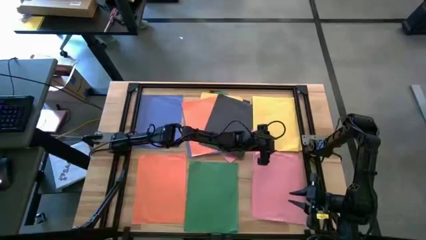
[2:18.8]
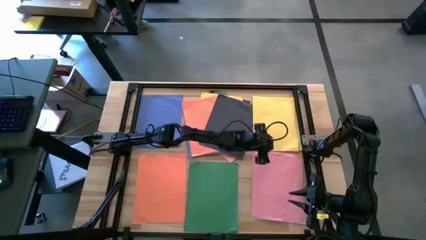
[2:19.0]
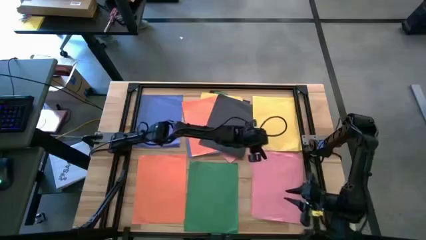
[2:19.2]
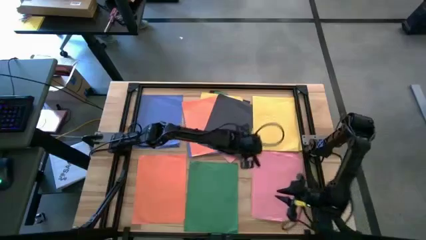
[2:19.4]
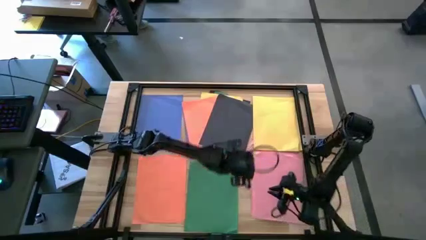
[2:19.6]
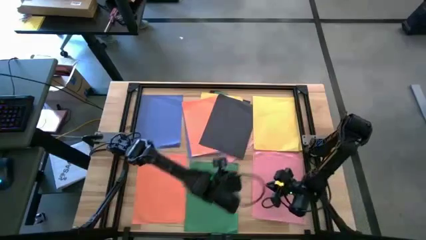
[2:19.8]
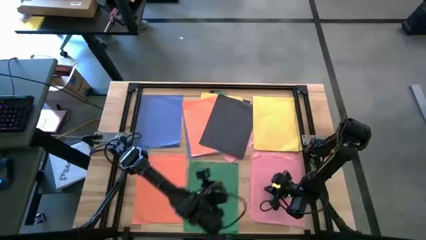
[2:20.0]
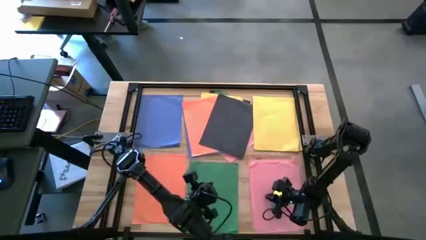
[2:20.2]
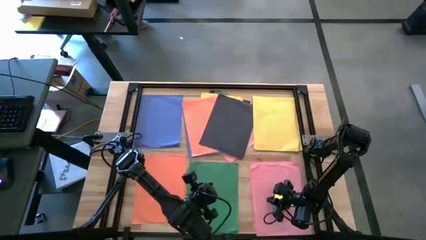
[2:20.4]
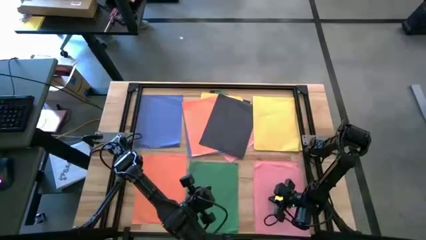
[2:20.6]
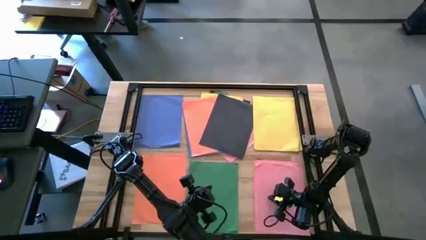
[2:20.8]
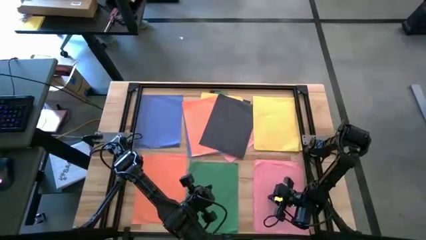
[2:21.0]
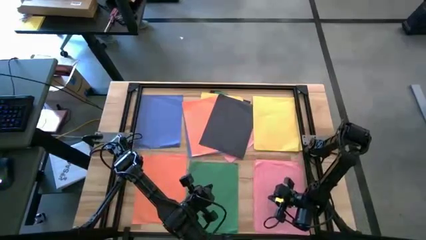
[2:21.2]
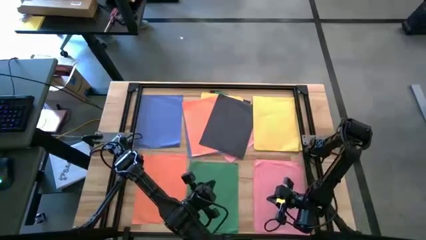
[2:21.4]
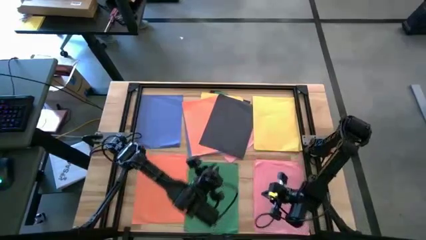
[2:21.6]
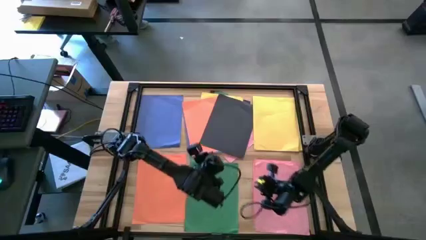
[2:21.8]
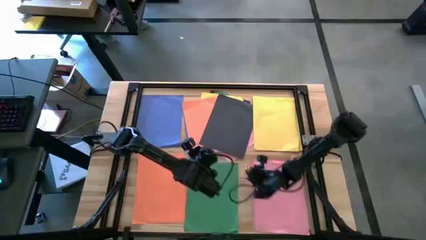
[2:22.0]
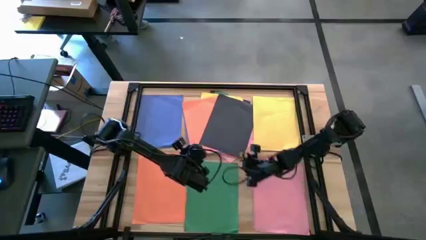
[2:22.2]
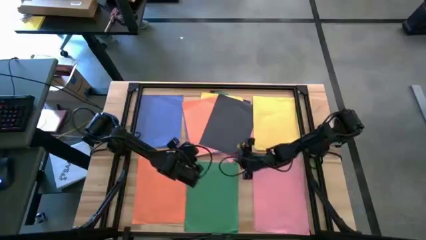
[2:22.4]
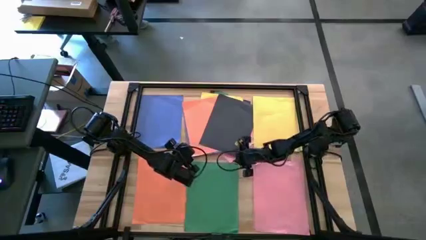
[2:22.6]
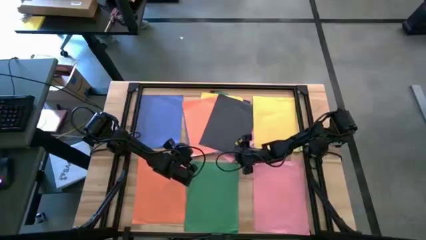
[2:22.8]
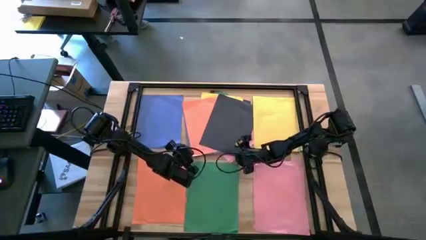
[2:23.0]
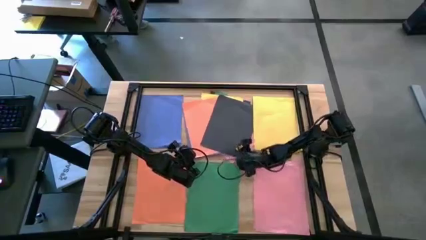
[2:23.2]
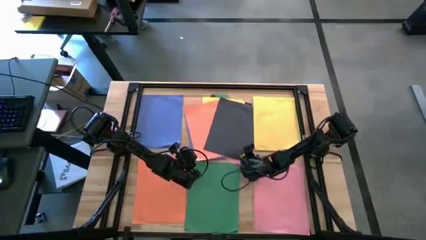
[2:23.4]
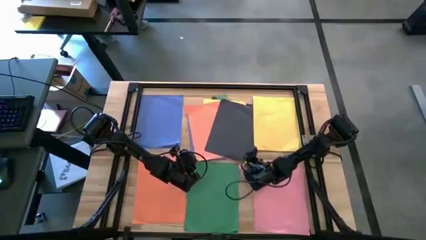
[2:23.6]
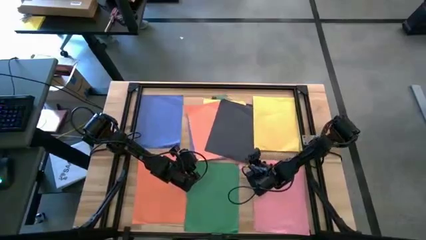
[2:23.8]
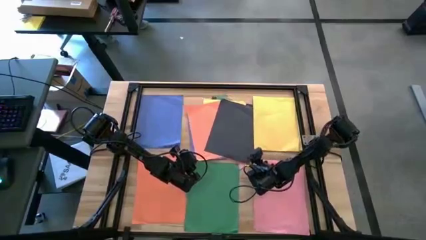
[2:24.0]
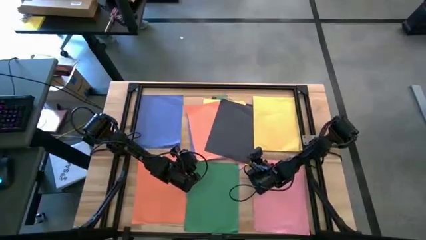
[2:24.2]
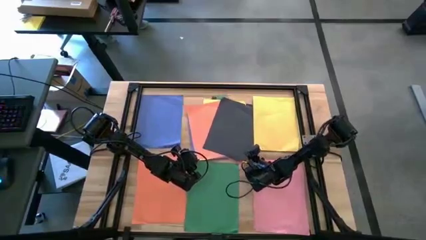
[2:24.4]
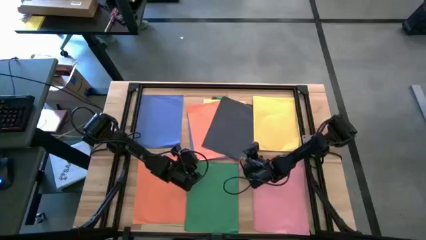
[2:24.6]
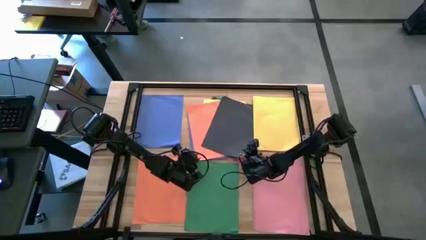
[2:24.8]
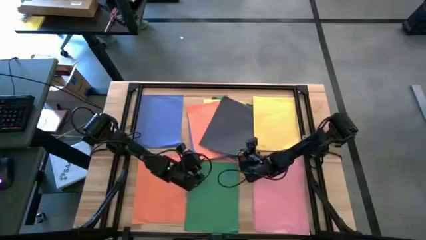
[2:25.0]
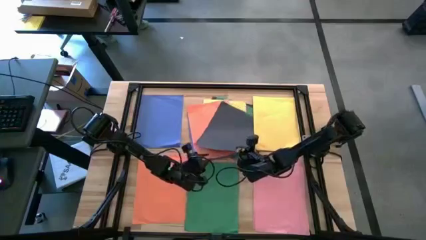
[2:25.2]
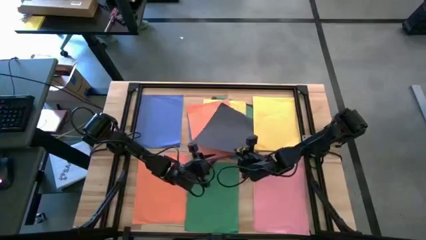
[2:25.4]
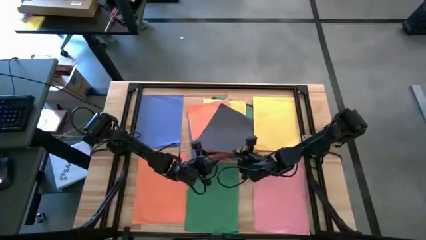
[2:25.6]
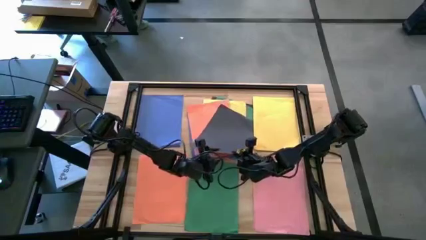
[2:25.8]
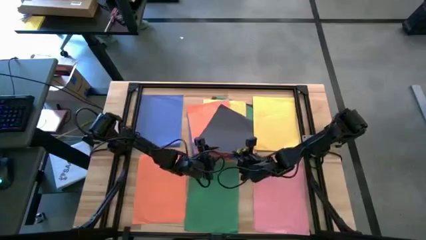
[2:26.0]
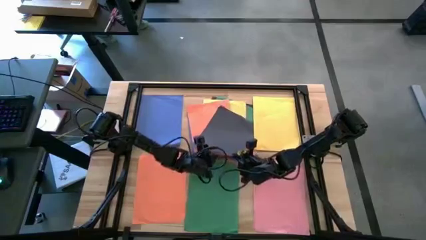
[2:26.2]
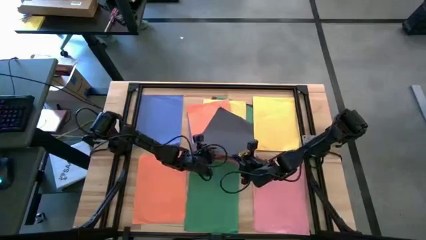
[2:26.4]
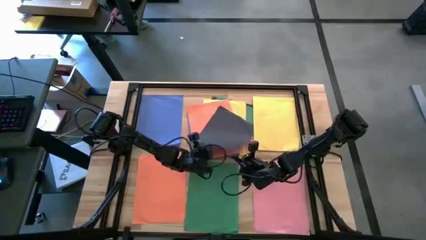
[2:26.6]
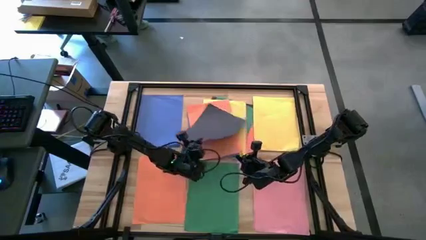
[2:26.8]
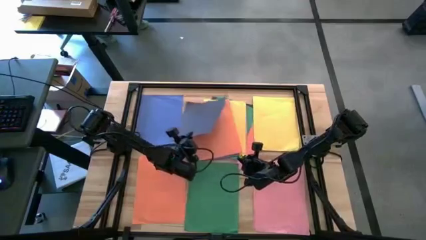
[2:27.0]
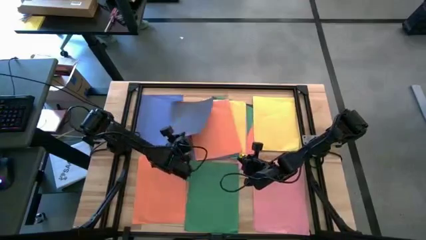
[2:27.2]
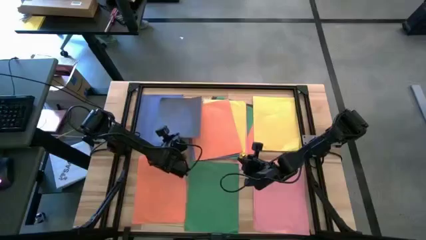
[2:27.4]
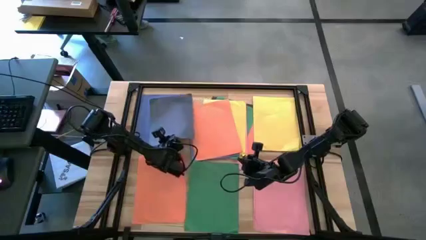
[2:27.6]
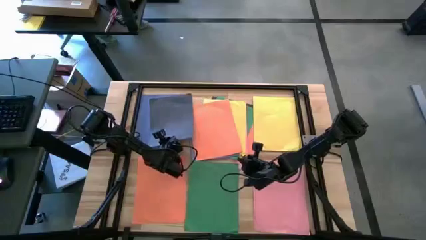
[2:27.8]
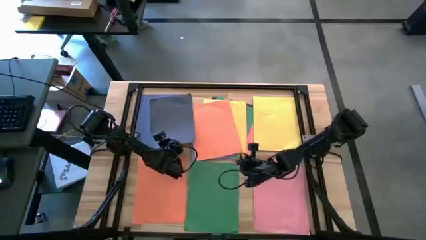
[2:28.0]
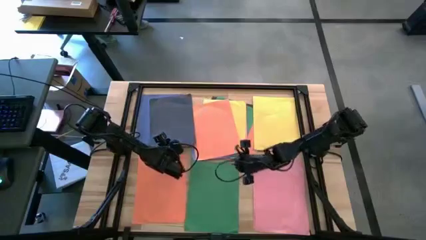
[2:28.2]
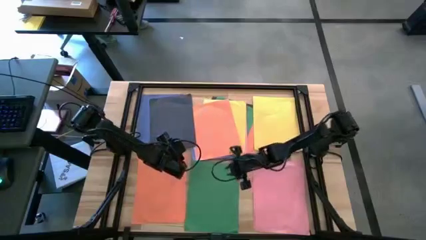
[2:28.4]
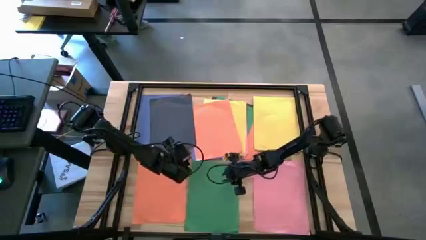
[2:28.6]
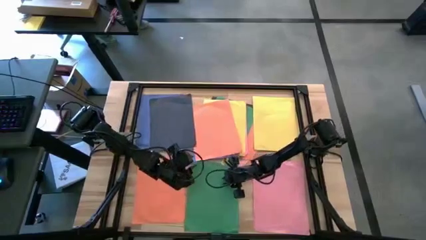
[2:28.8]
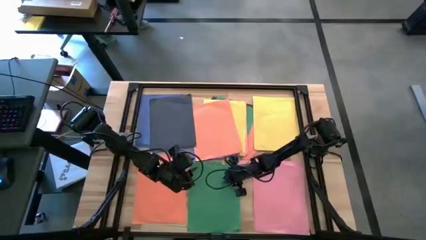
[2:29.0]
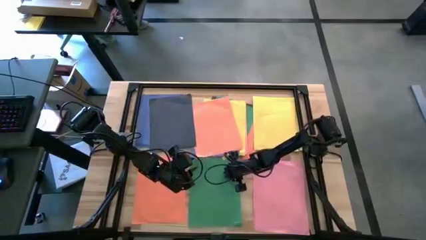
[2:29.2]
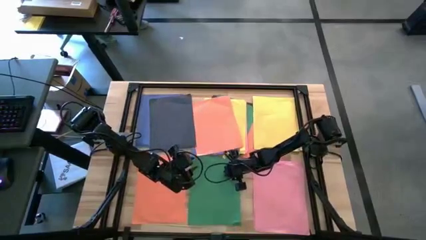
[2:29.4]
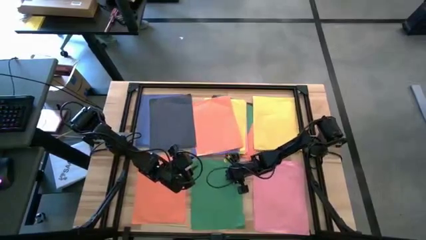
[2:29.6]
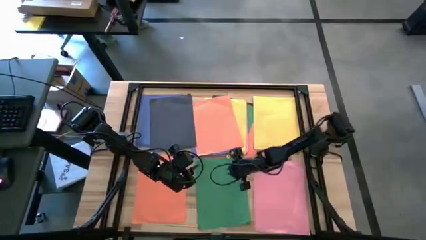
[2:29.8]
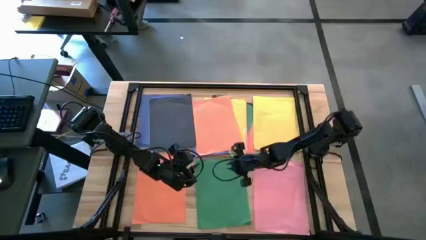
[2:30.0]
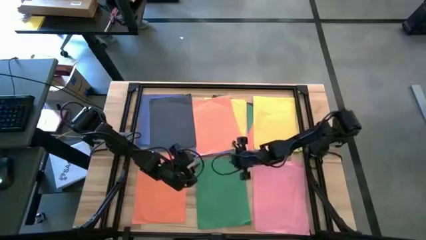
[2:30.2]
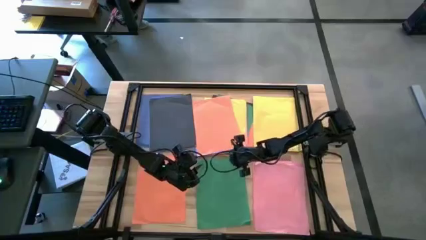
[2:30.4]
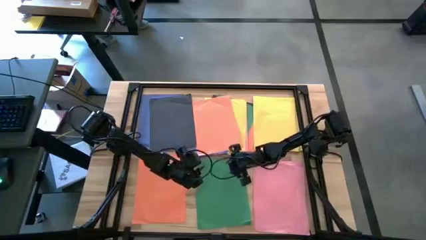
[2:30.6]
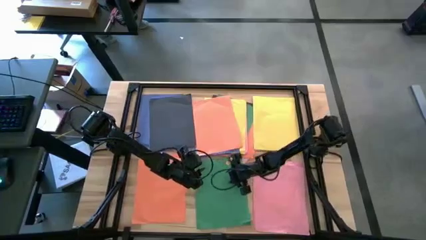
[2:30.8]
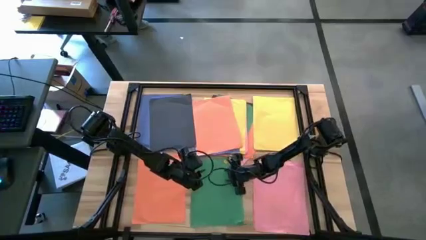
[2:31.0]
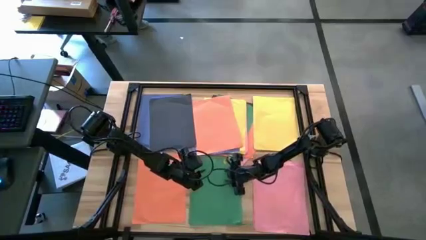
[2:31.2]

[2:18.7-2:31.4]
Task: Organize paper
Stack the orange paper under the black paper on the bottom orange paper
